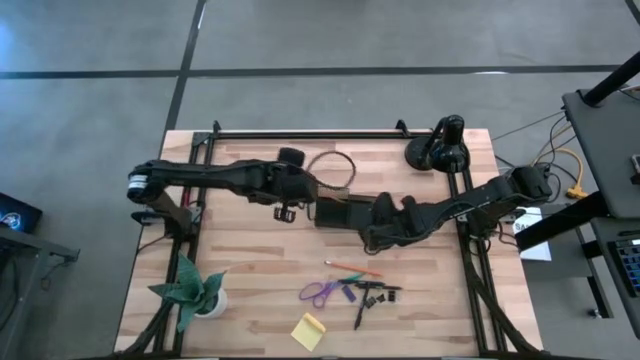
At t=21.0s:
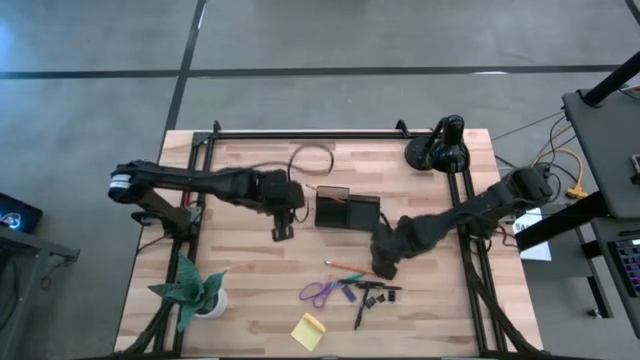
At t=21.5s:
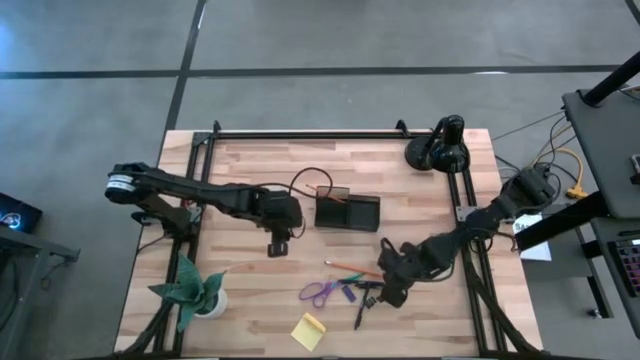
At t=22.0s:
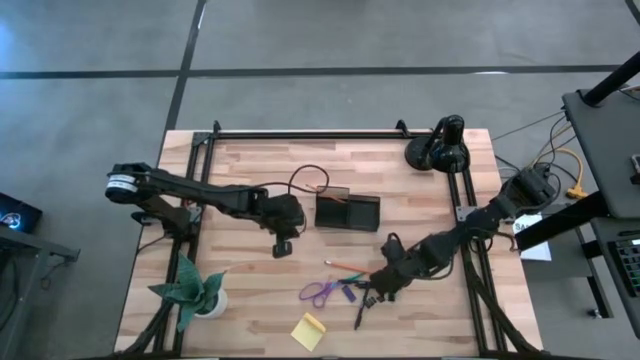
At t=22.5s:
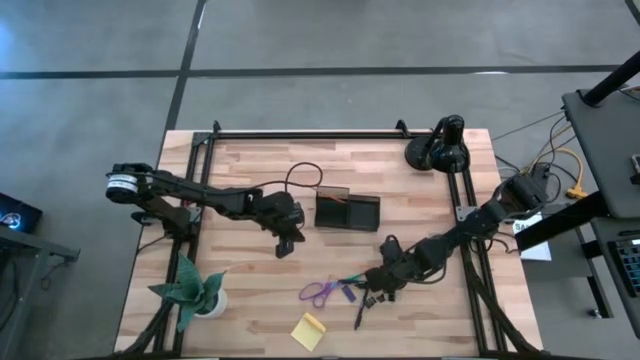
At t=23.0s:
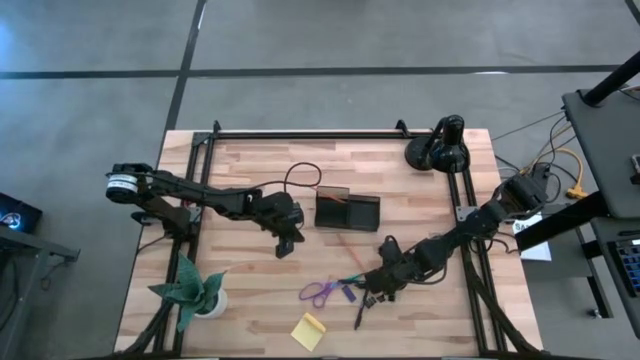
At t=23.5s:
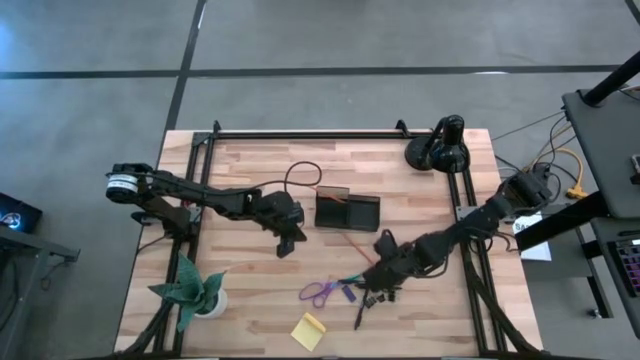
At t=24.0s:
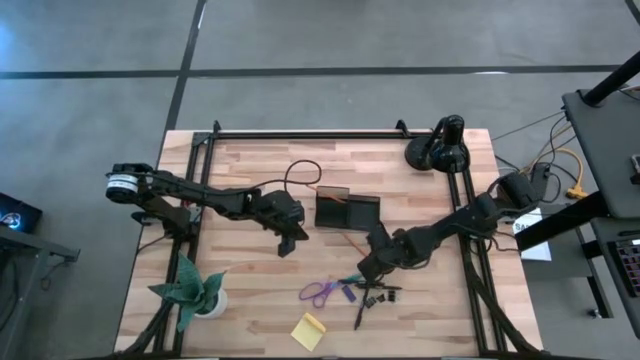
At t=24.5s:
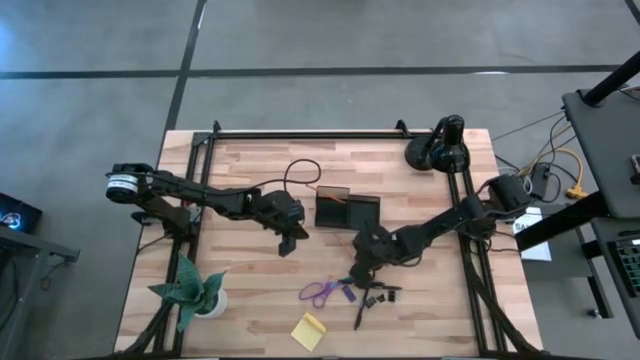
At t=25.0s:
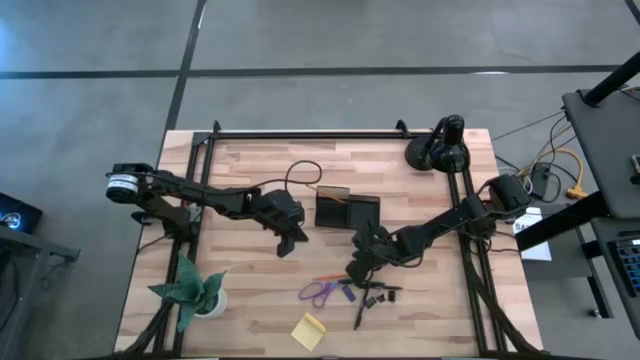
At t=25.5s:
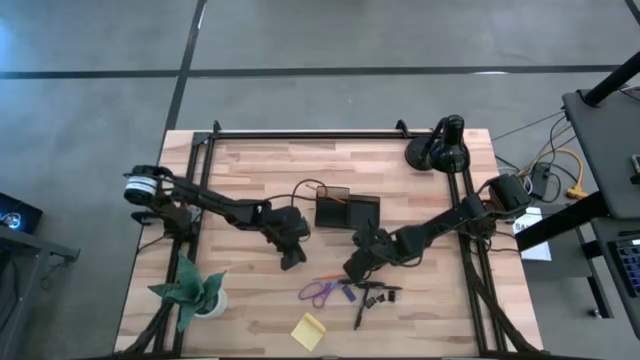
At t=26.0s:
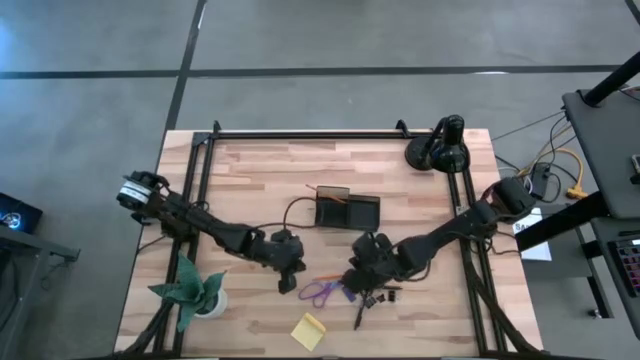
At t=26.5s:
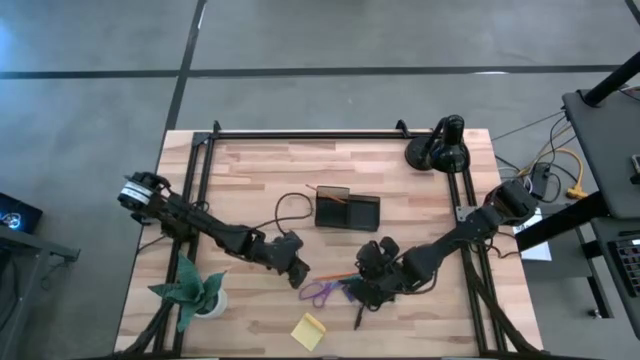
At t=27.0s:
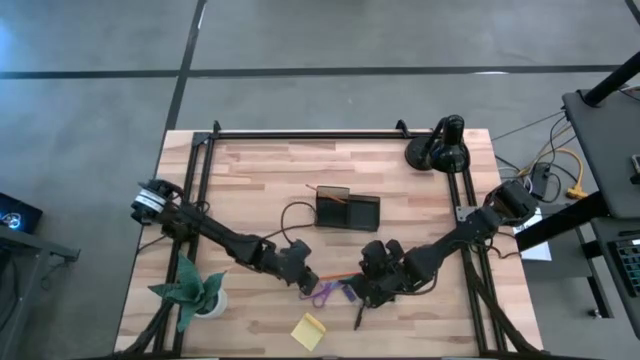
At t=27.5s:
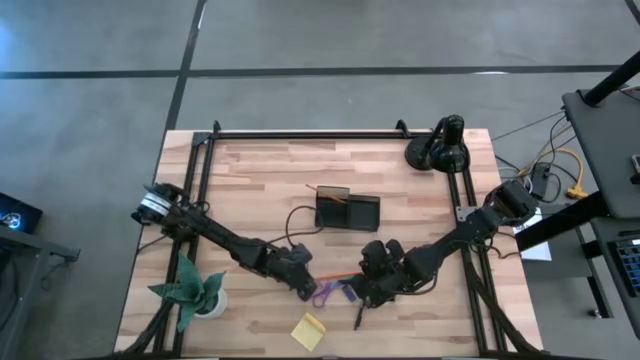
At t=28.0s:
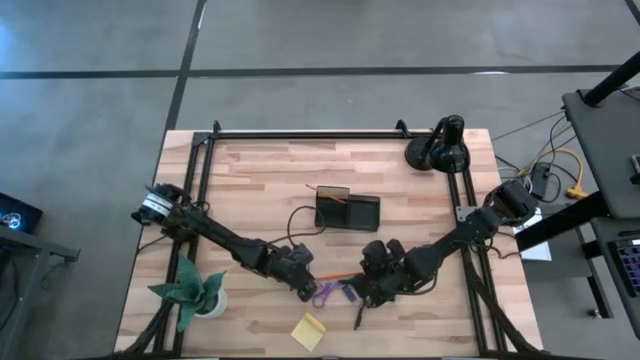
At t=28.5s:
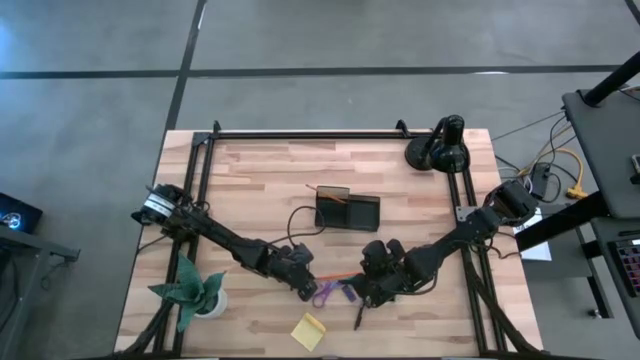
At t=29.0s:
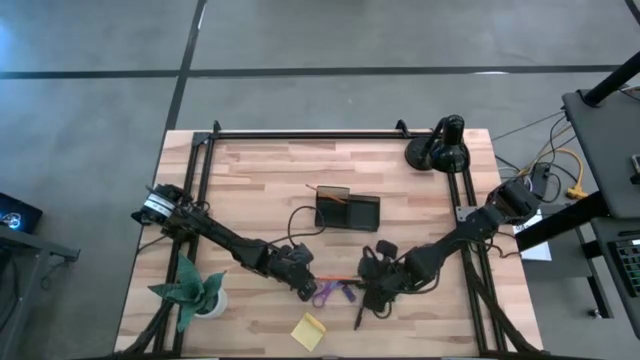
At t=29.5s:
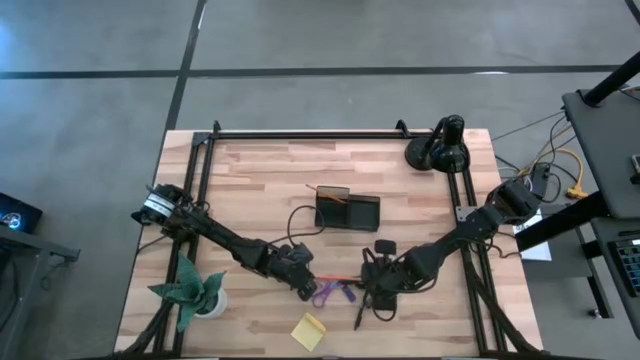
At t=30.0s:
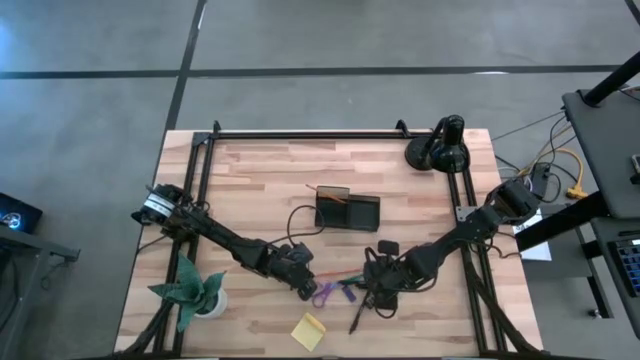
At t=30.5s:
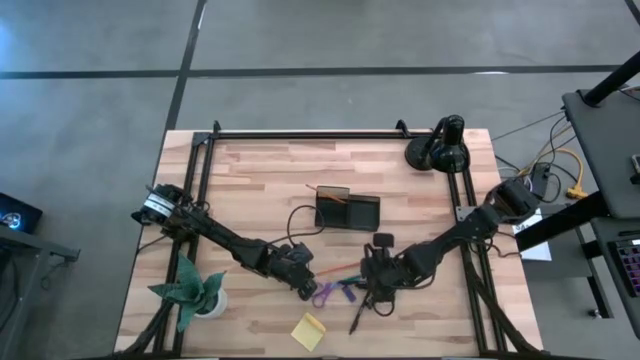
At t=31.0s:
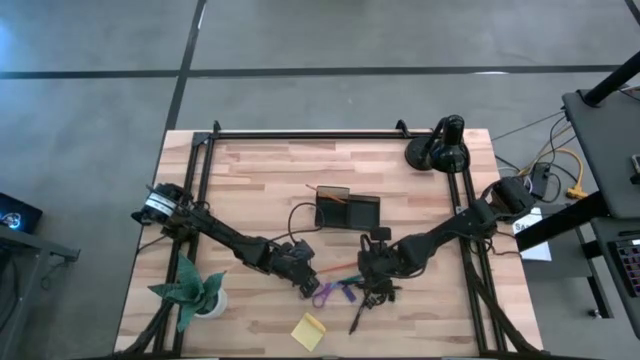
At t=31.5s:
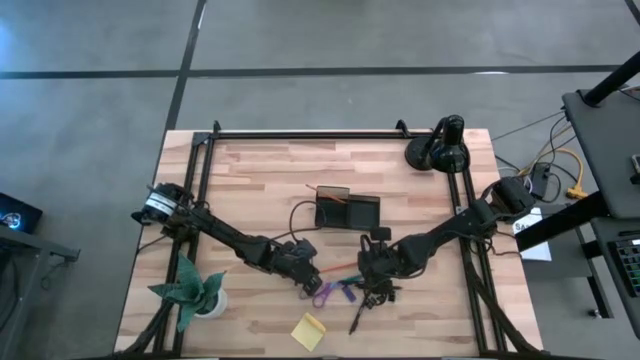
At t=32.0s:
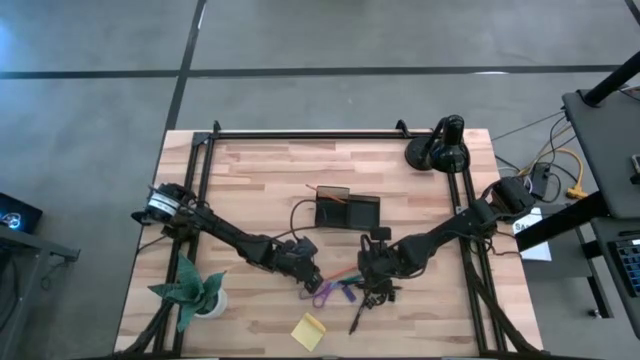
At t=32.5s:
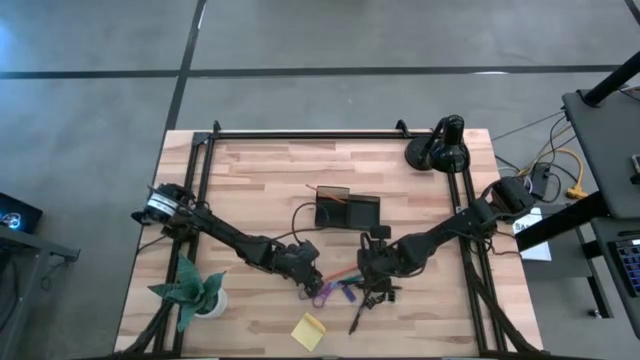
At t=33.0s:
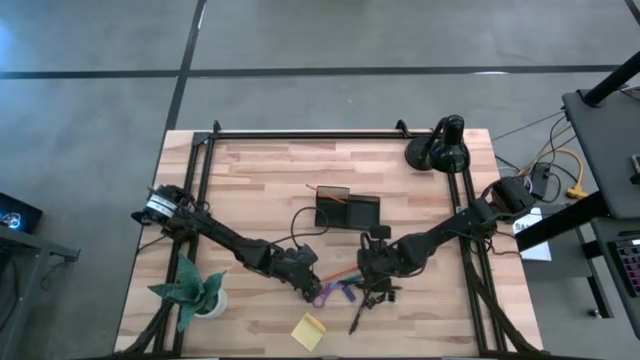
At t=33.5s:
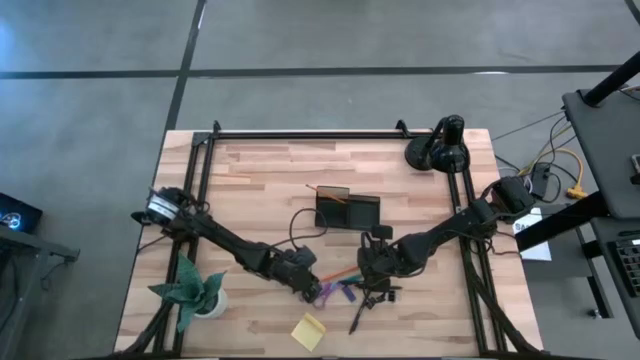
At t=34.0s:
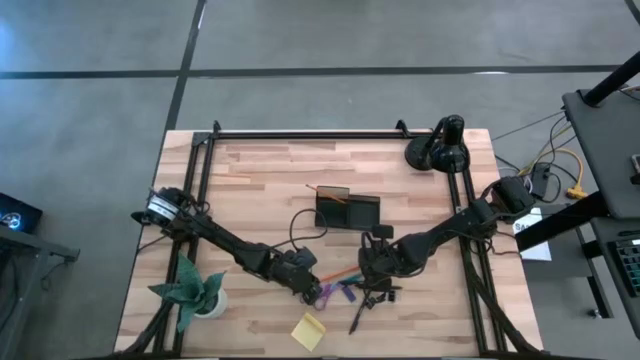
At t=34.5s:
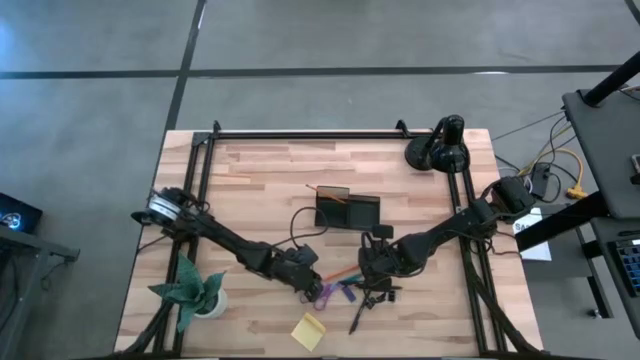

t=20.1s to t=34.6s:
Task: Pick and place office supplies into organizer
Put the yellow pencil into the black desk organizer

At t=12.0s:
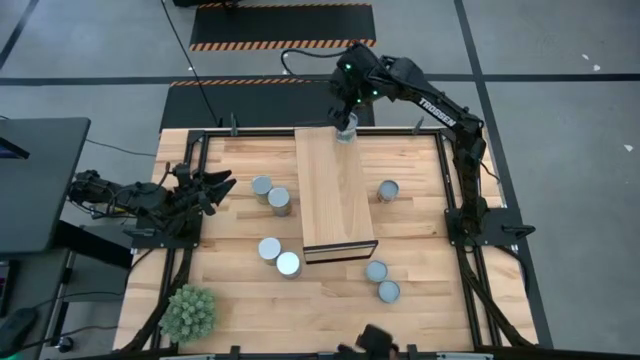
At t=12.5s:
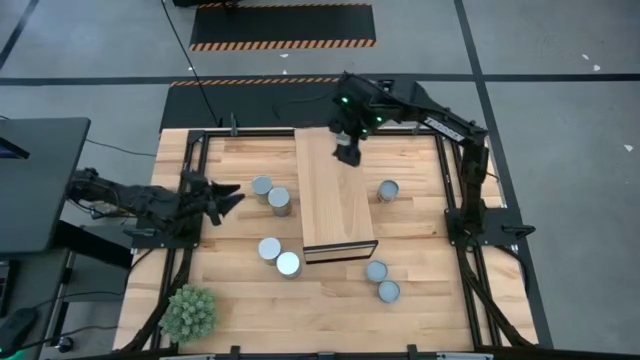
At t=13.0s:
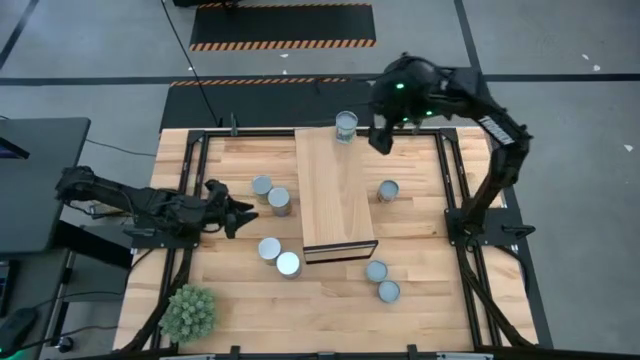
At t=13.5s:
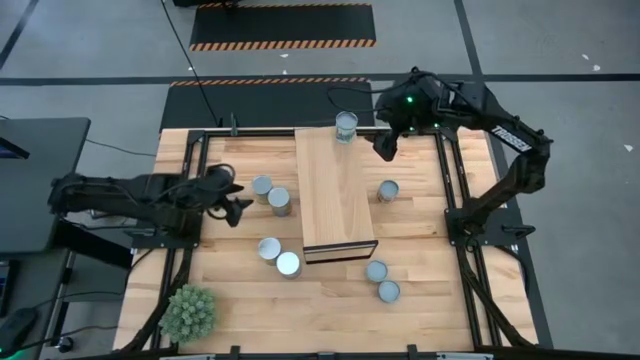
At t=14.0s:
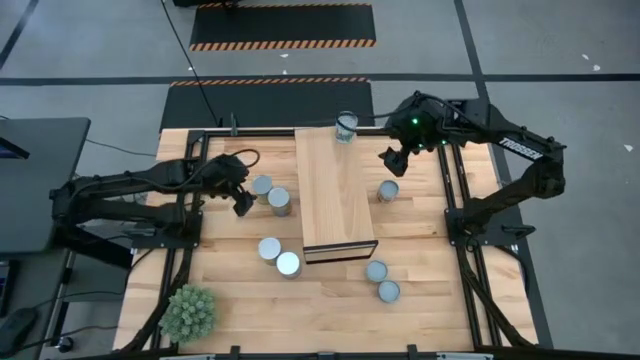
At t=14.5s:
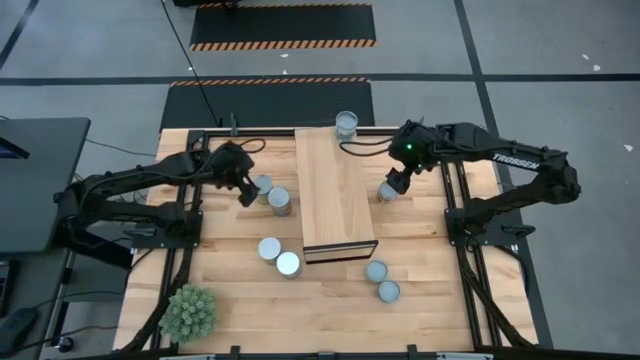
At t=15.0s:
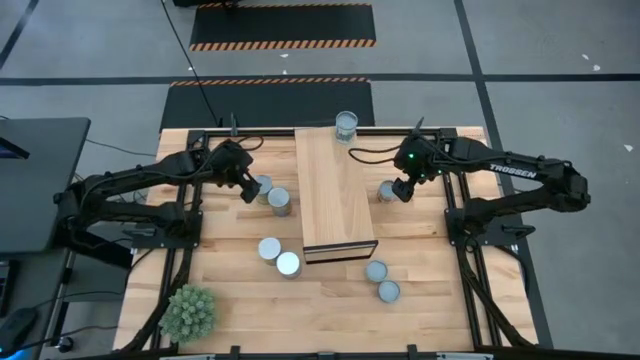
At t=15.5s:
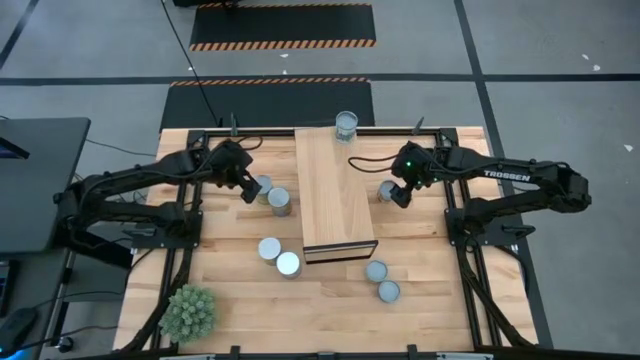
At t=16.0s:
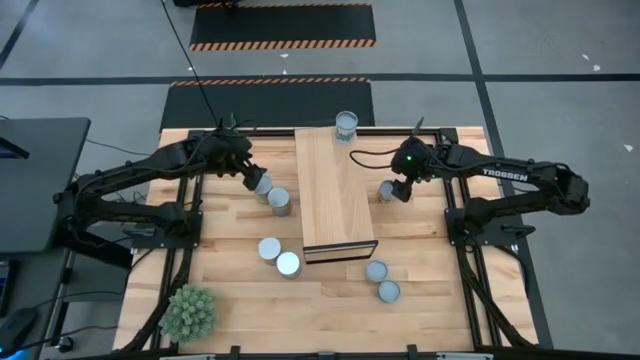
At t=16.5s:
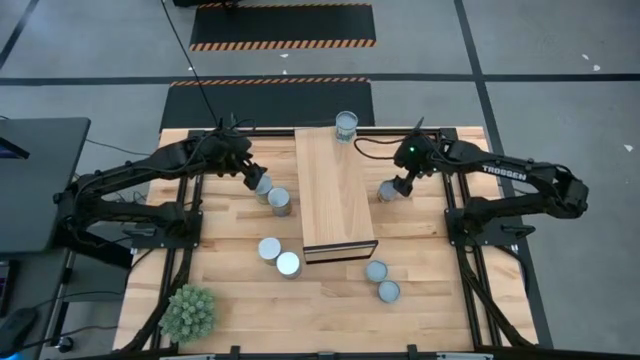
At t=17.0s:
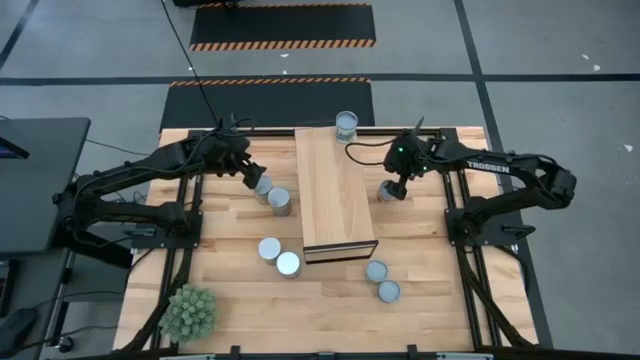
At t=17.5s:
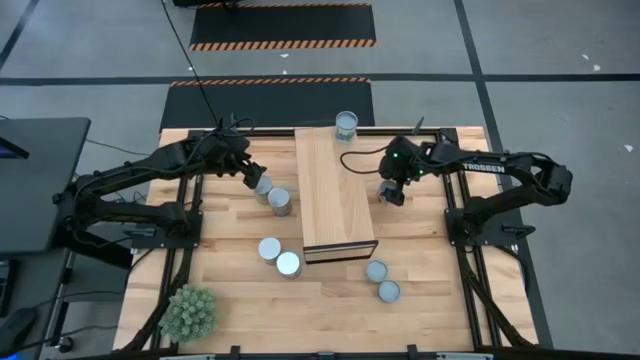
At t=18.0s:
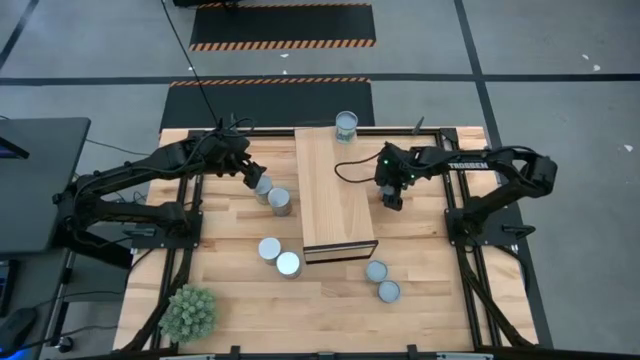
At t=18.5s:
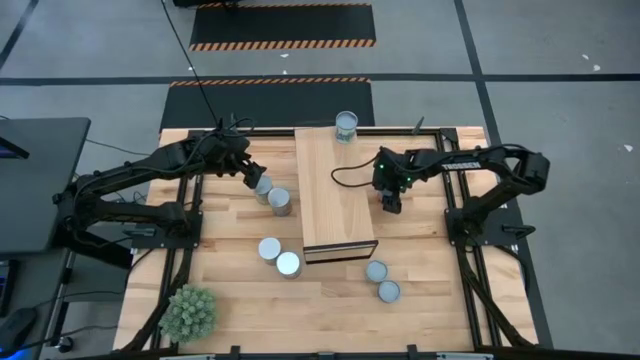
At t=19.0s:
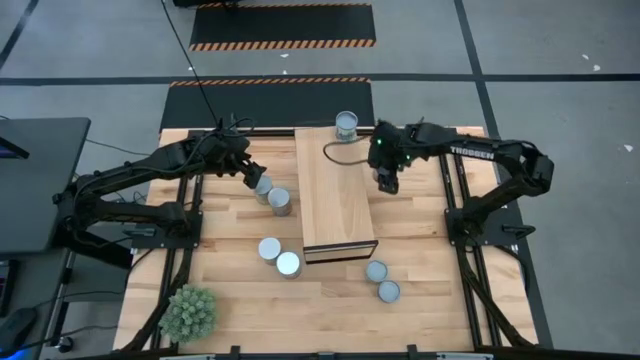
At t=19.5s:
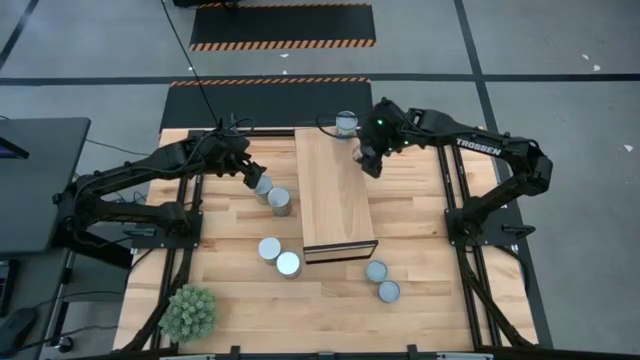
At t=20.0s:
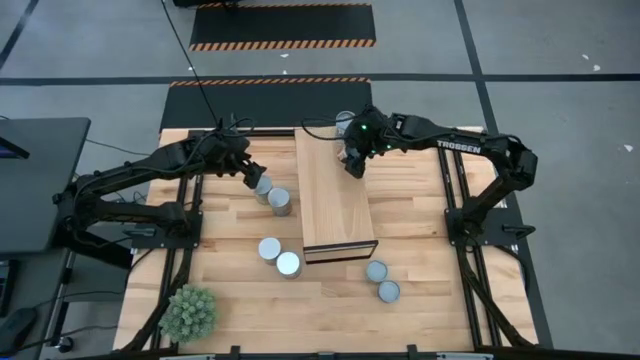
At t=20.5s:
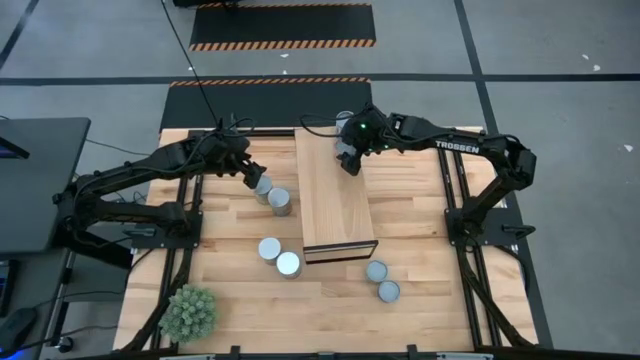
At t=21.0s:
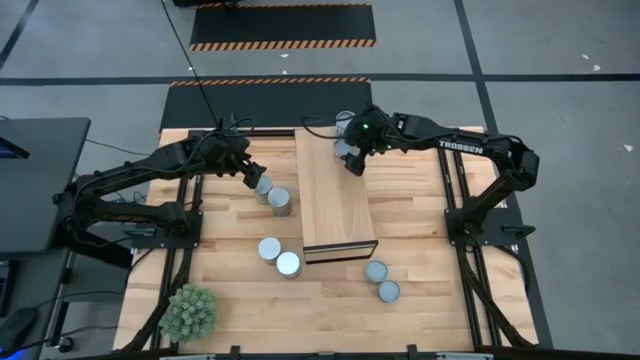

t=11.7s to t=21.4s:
Task: Pick and place cans onto a shelf
Put the canned diced tomatoes on the shelf
